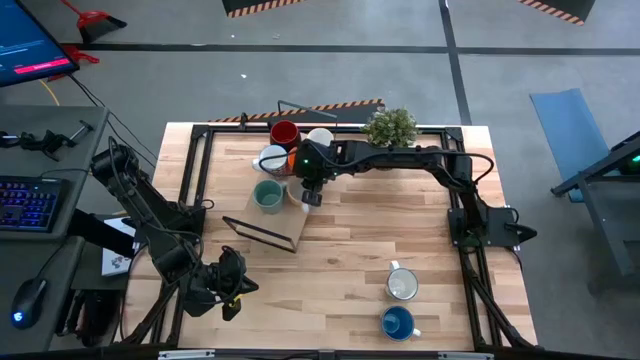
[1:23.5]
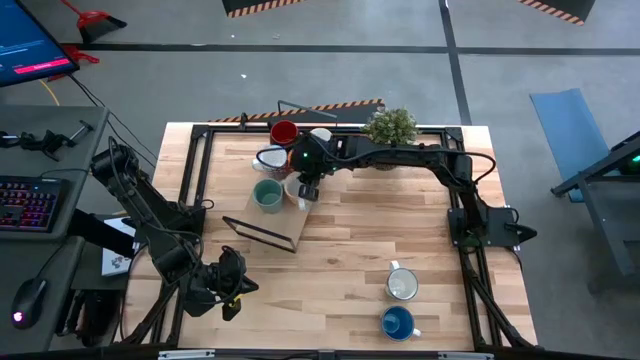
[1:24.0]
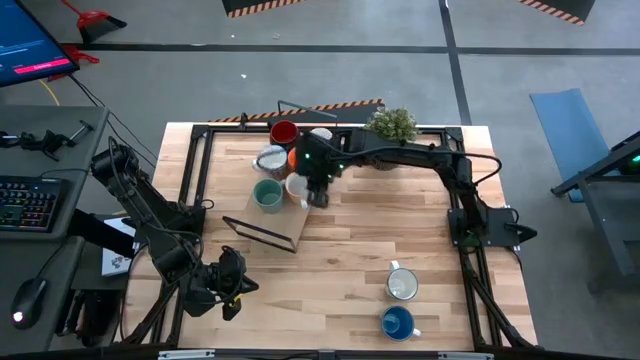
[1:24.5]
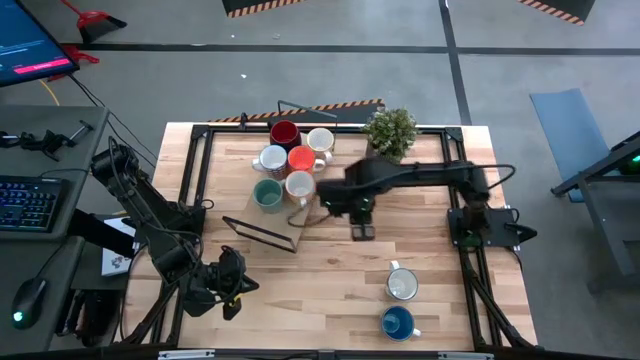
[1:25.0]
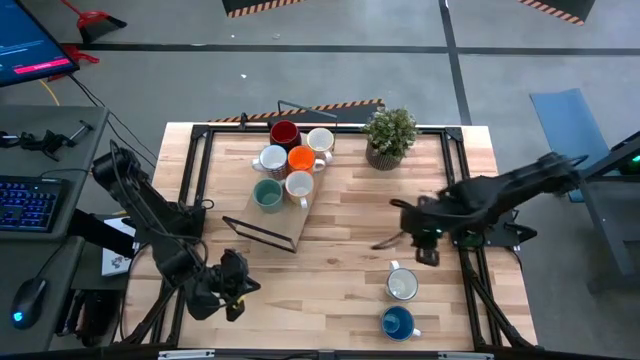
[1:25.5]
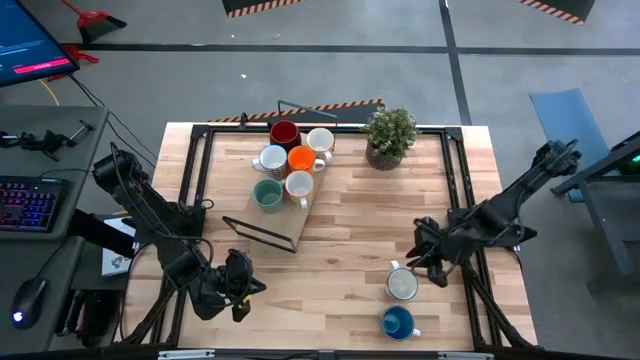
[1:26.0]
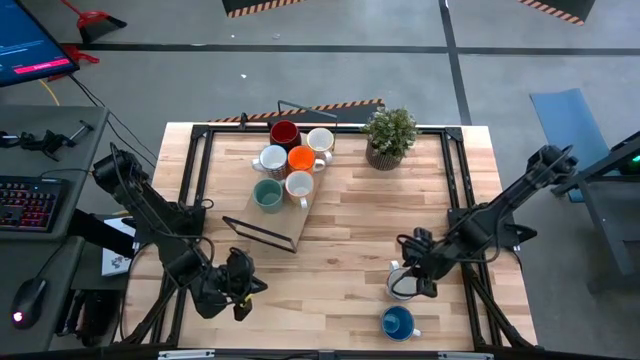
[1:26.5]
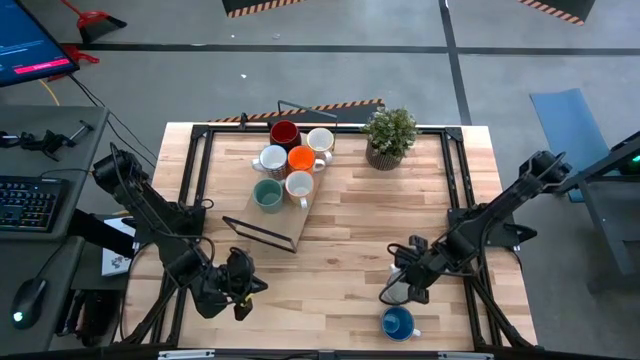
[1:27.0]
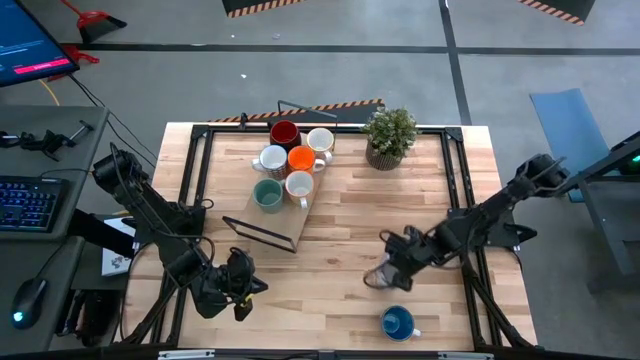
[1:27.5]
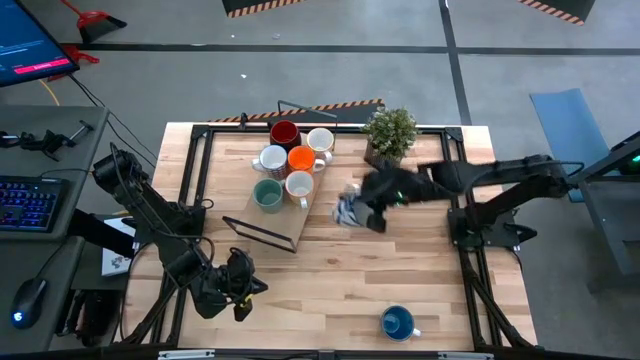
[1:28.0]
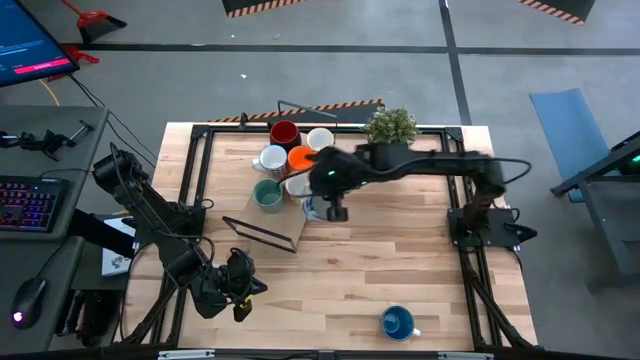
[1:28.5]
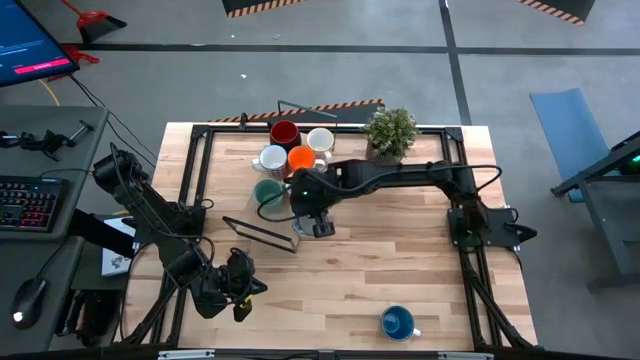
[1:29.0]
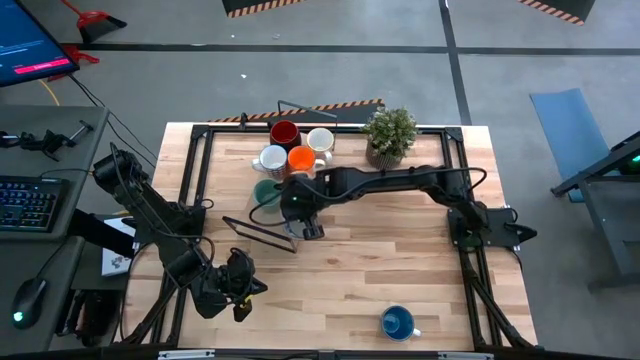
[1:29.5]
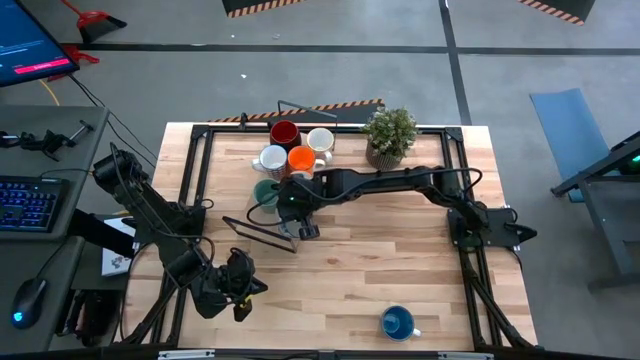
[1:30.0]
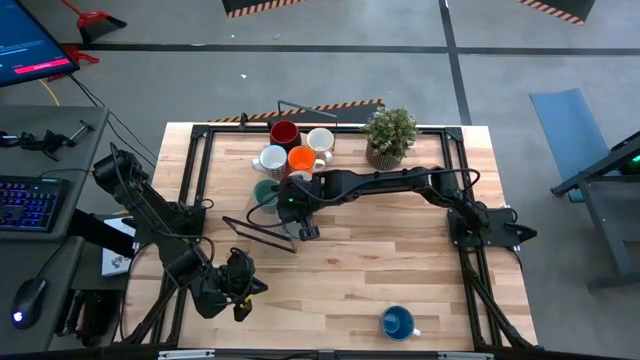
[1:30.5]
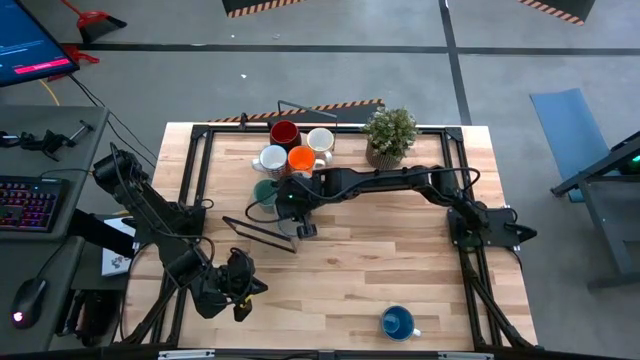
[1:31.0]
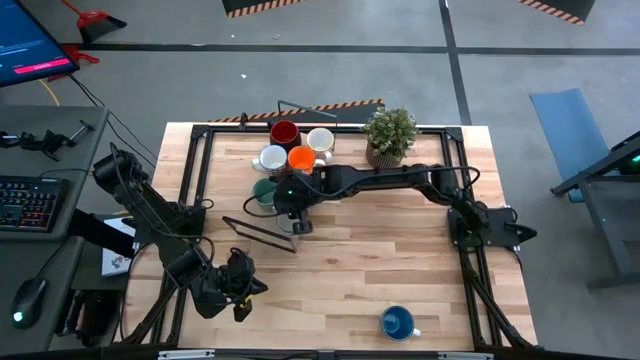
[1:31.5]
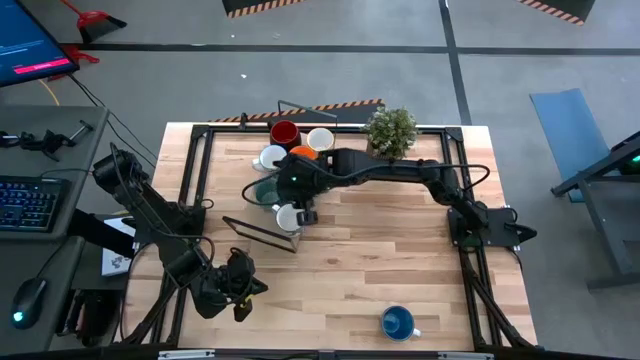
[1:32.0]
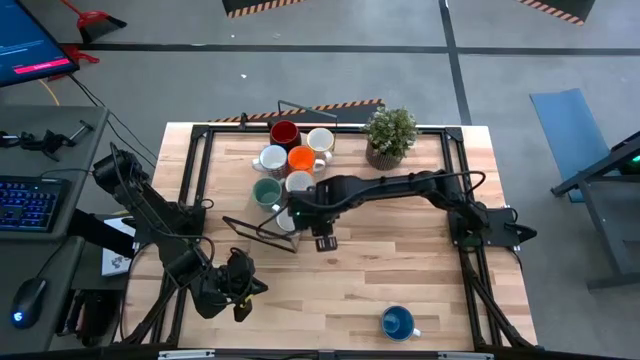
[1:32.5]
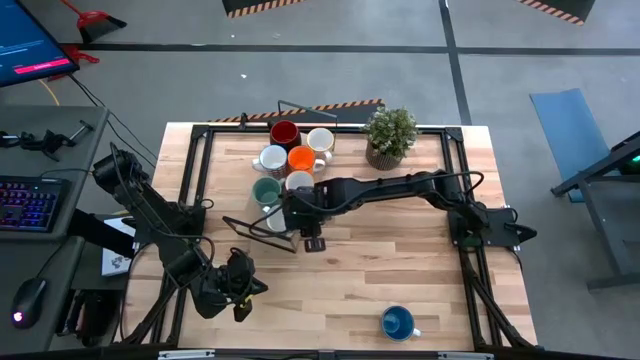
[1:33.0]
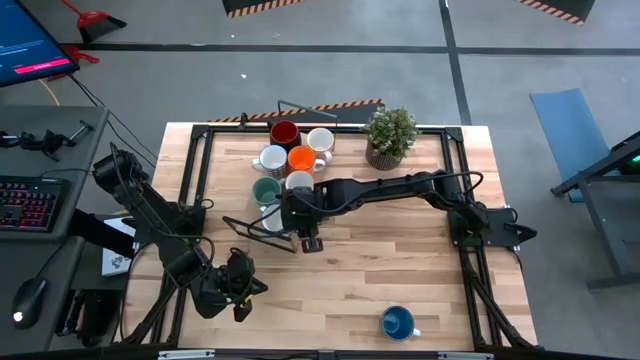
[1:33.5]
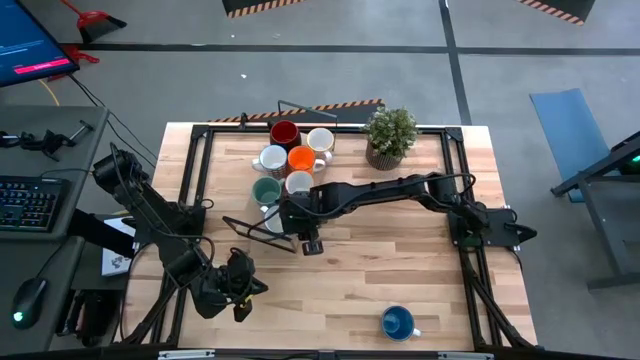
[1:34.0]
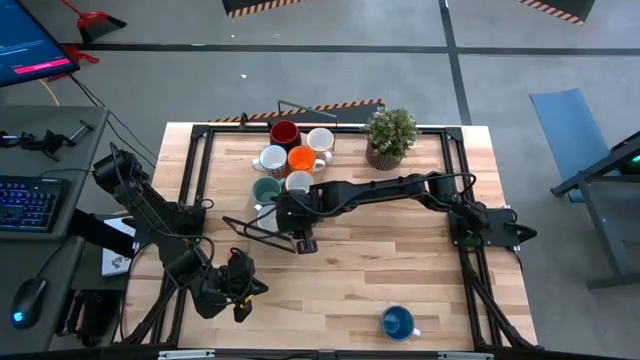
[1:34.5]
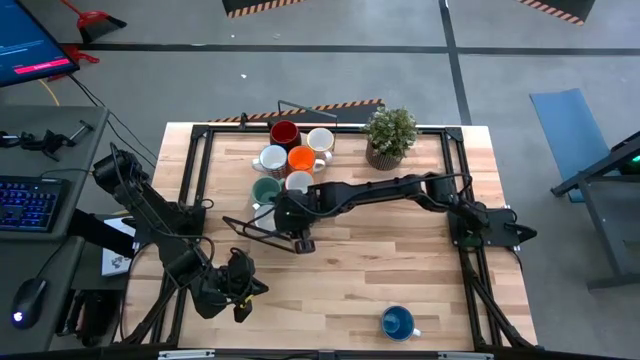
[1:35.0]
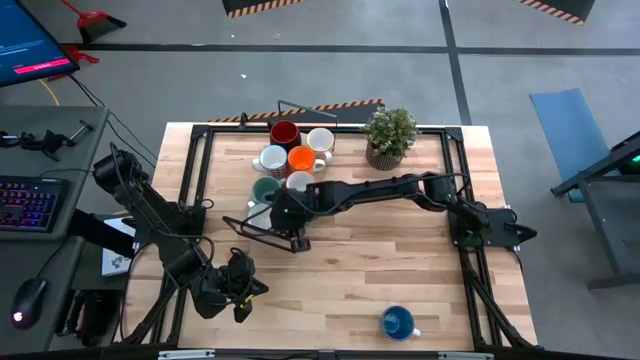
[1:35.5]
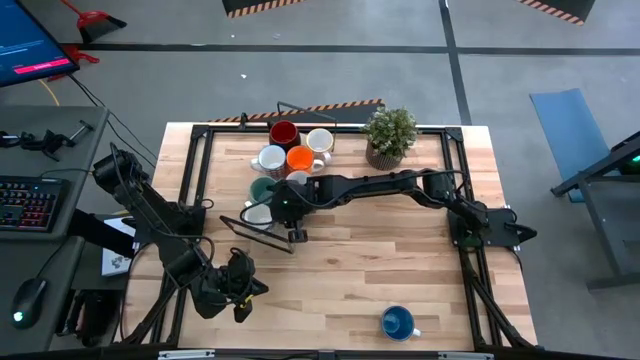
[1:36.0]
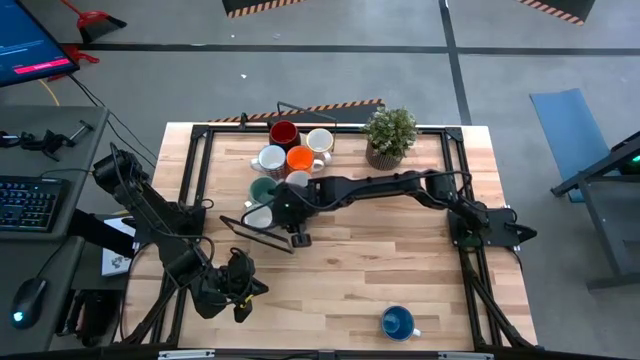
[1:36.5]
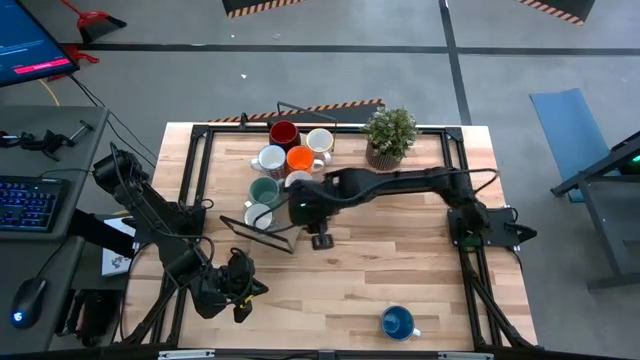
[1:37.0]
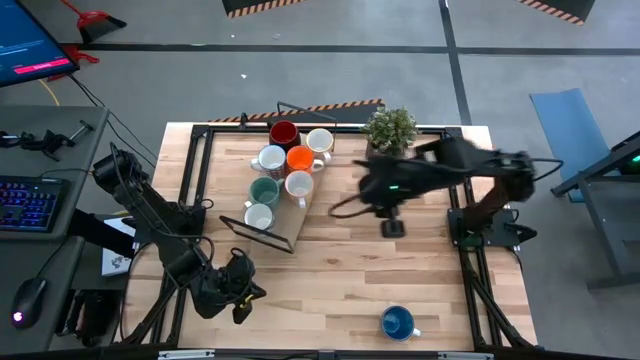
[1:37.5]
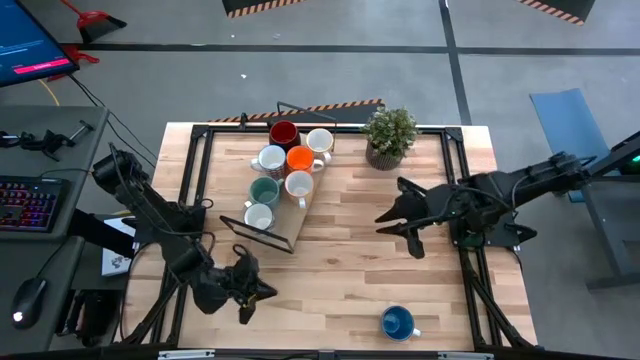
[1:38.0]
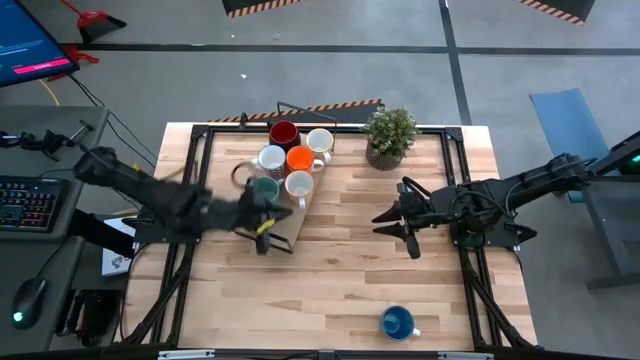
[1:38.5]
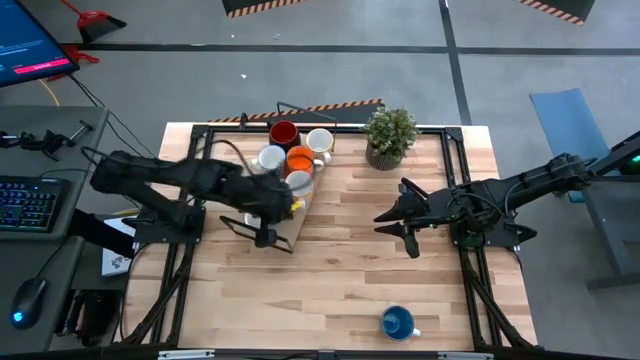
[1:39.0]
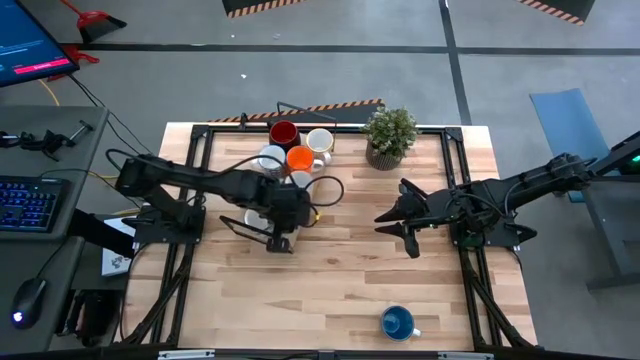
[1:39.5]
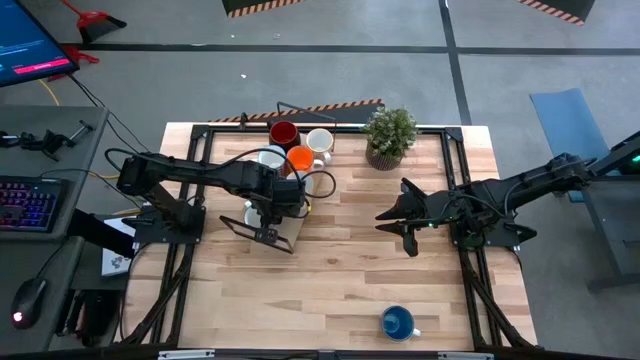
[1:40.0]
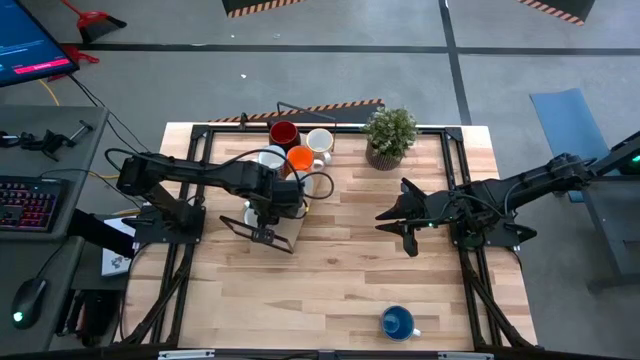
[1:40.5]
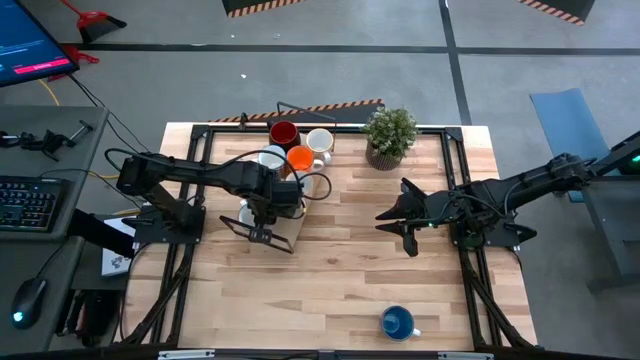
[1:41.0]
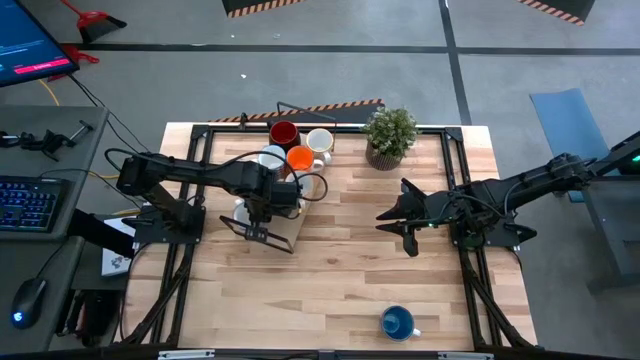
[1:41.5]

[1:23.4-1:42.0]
Task: Place coffee mugs
Put the dark blue cup on the shelf

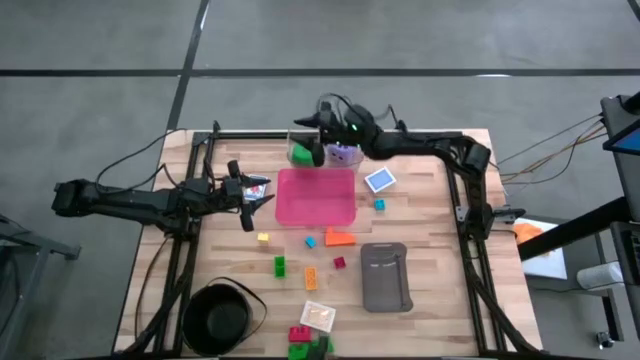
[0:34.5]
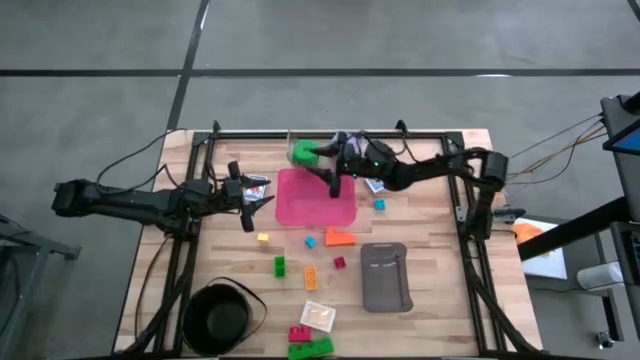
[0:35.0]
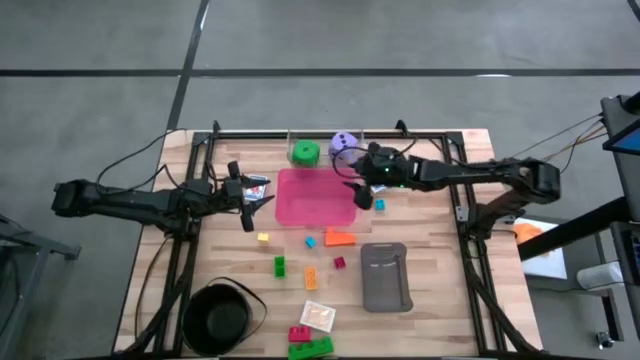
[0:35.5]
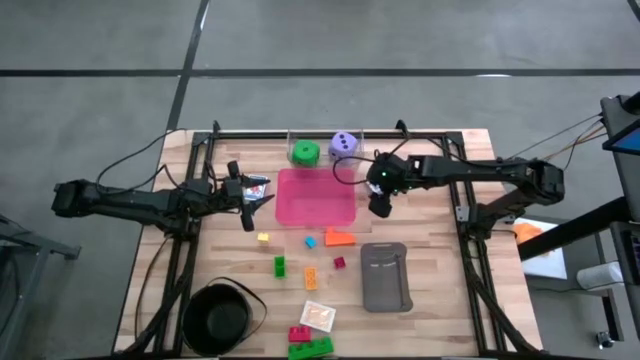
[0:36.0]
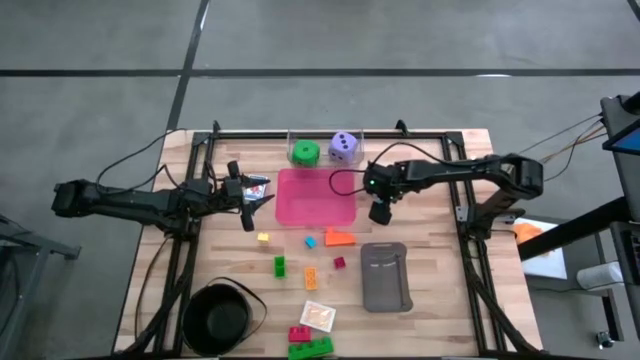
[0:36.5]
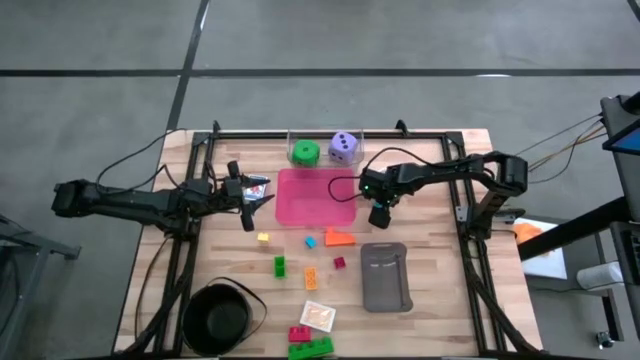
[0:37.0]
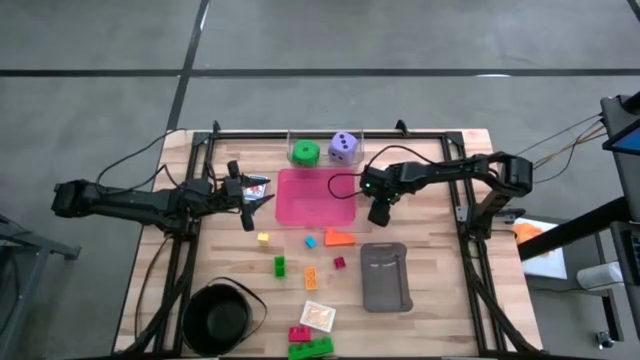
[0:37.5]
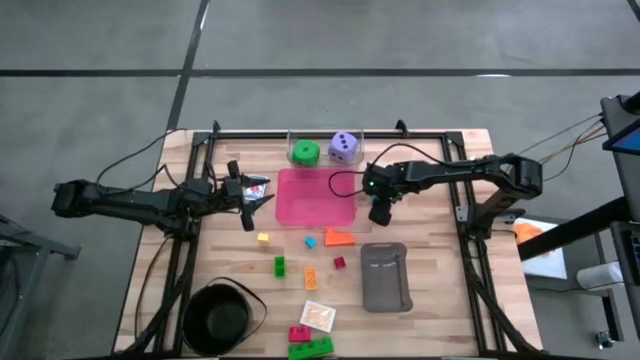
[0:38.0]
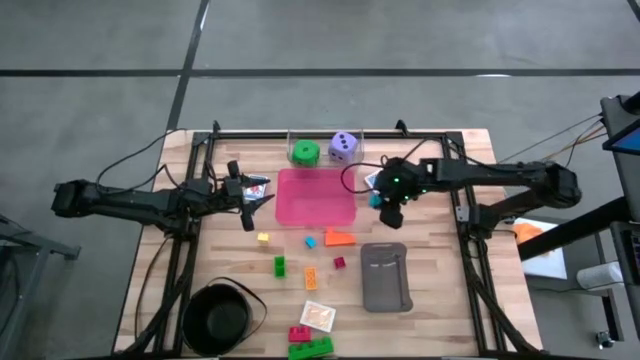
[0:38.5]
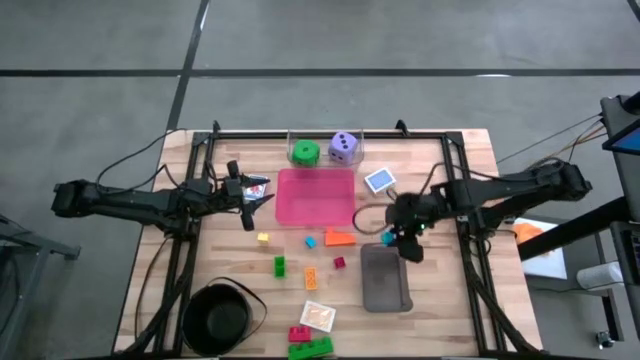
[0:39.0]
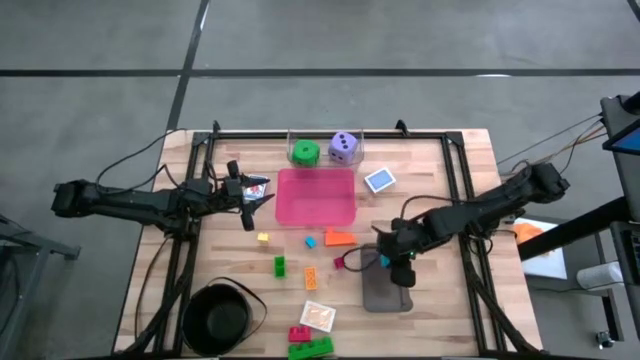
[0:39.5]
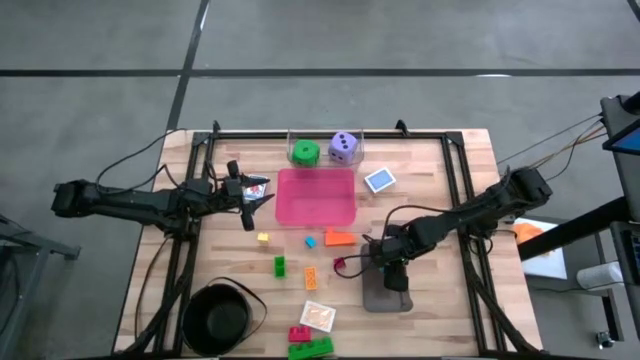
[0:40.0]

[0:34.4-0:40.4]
Task: Pick & Place Toys
Put the right small blue game piece into the black bin
